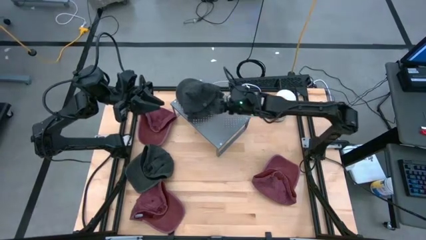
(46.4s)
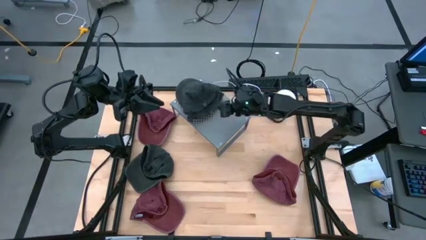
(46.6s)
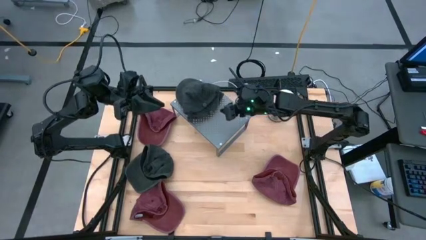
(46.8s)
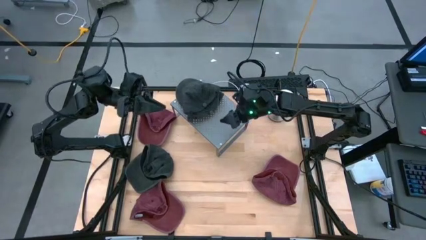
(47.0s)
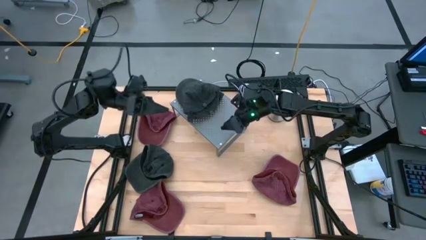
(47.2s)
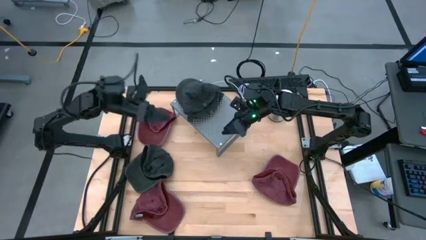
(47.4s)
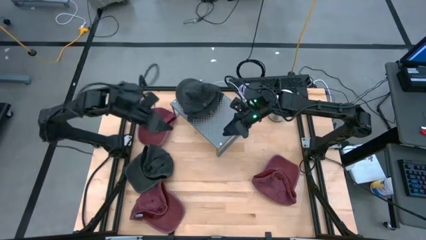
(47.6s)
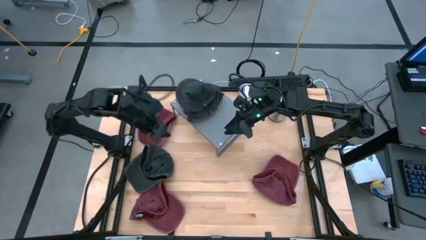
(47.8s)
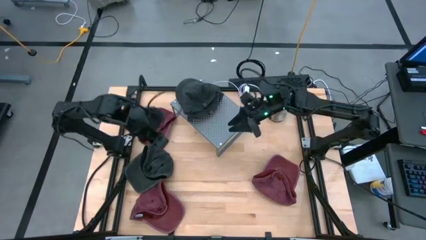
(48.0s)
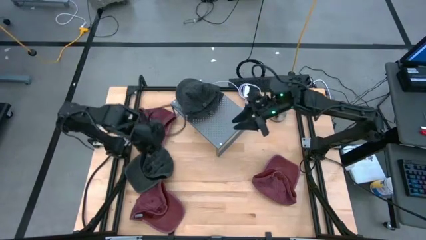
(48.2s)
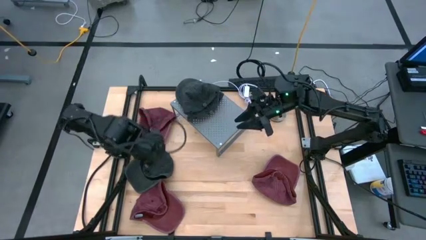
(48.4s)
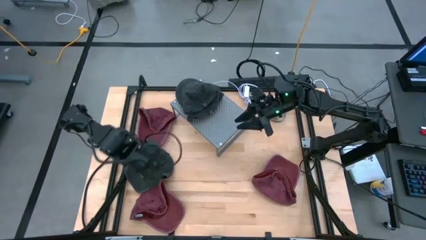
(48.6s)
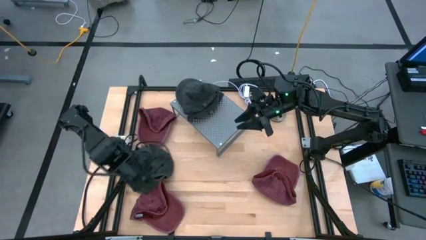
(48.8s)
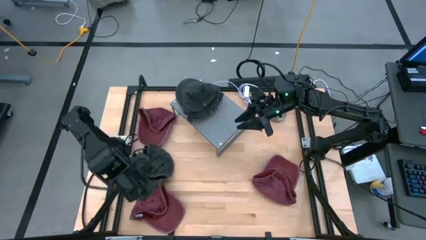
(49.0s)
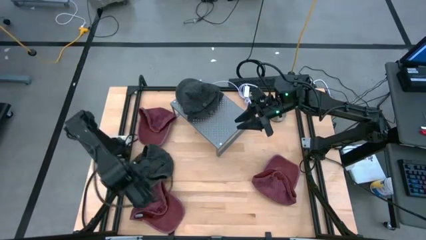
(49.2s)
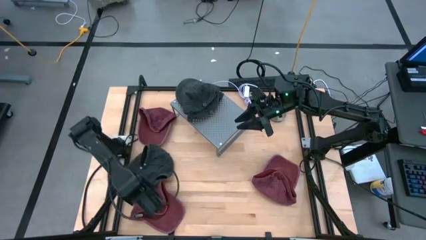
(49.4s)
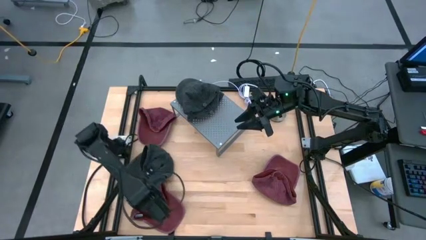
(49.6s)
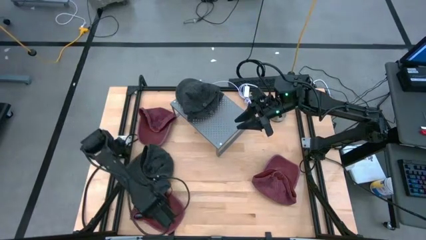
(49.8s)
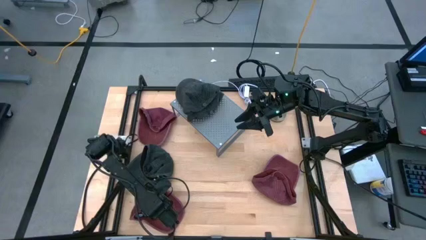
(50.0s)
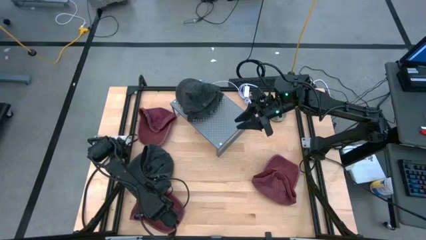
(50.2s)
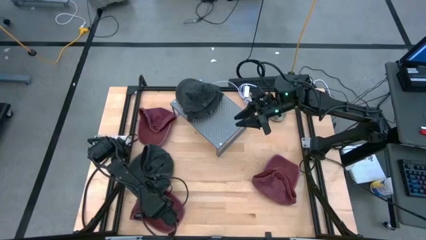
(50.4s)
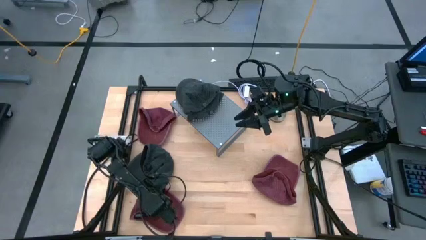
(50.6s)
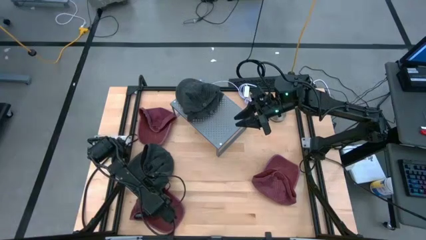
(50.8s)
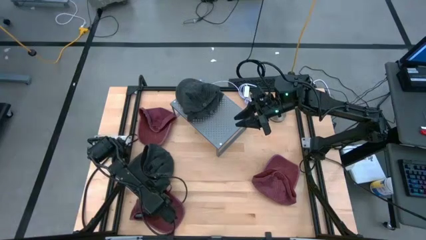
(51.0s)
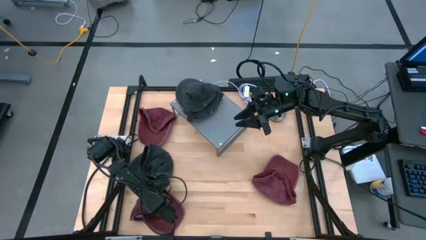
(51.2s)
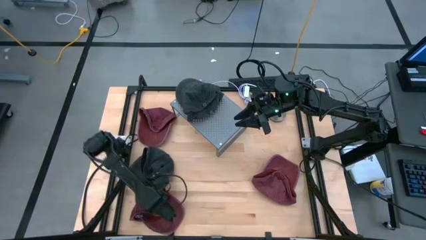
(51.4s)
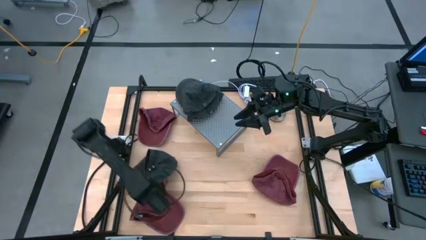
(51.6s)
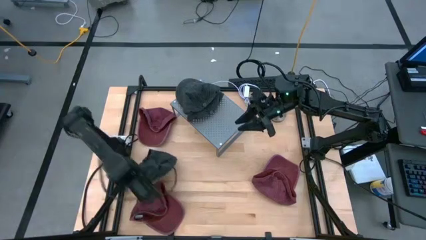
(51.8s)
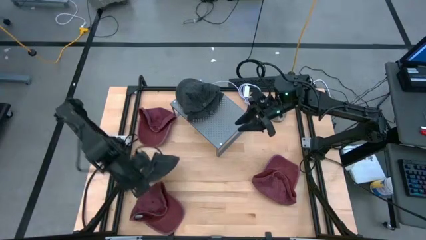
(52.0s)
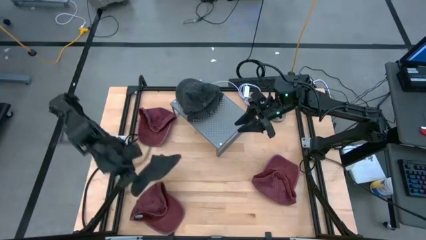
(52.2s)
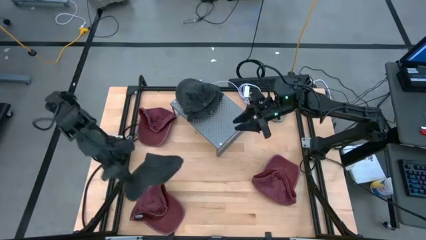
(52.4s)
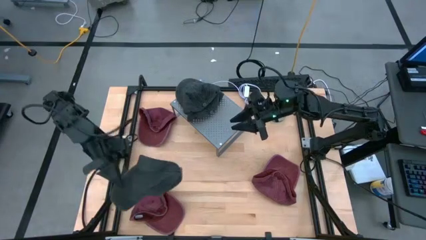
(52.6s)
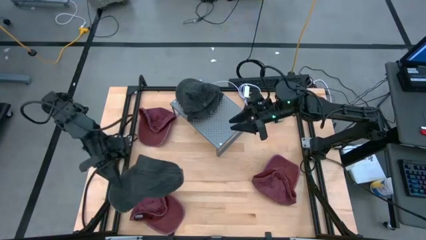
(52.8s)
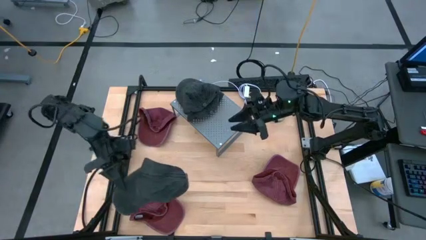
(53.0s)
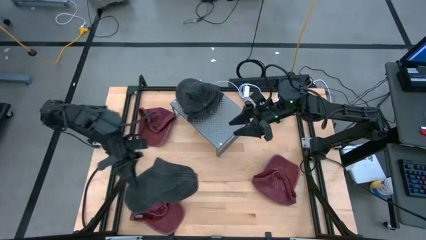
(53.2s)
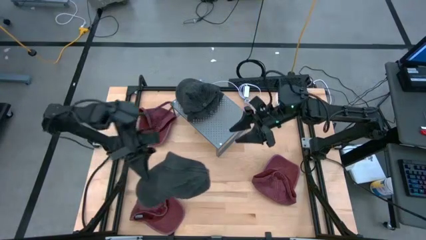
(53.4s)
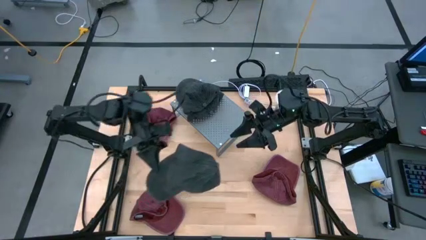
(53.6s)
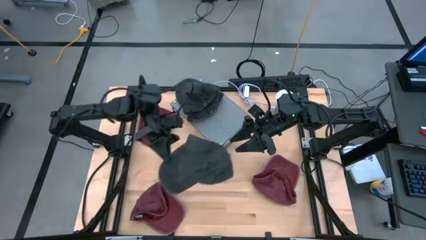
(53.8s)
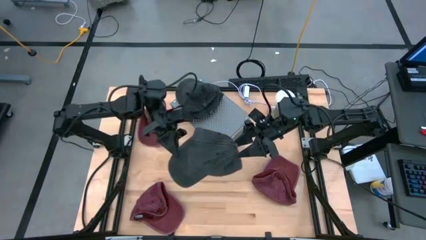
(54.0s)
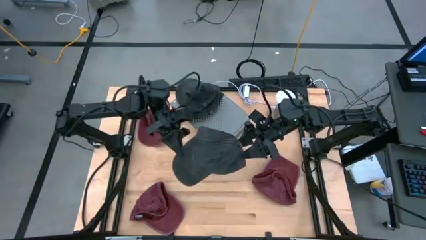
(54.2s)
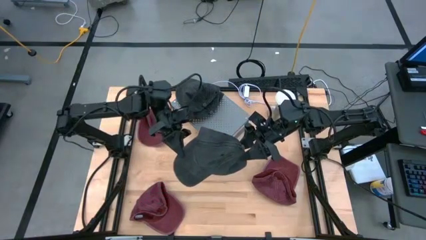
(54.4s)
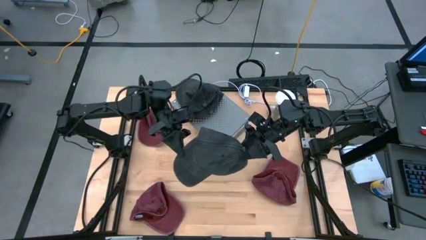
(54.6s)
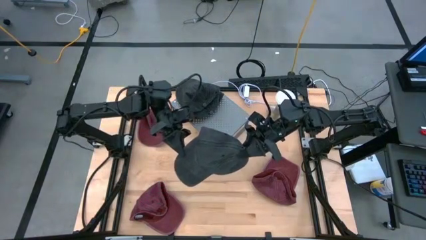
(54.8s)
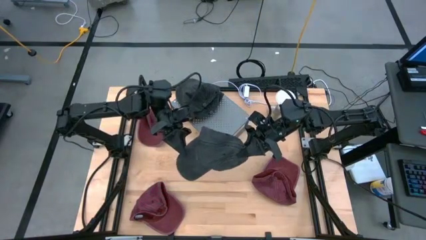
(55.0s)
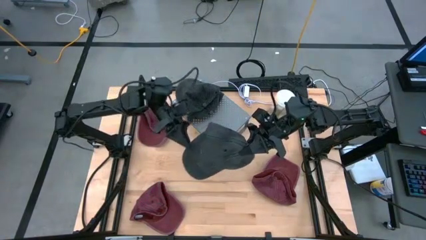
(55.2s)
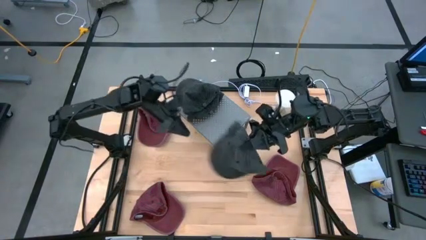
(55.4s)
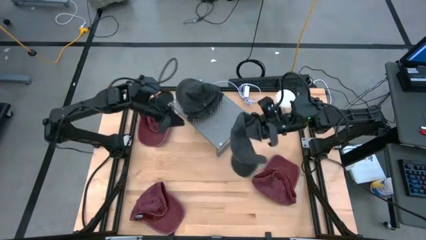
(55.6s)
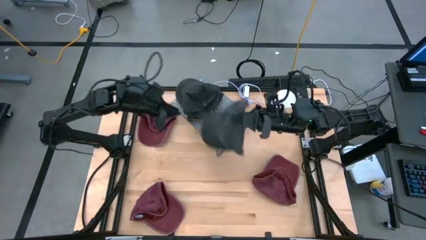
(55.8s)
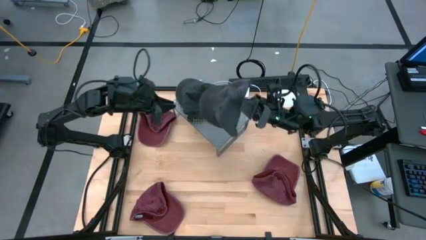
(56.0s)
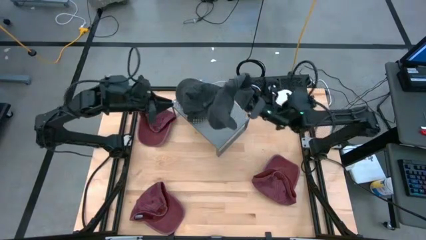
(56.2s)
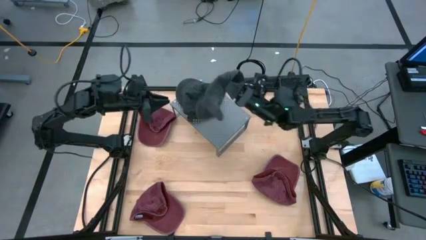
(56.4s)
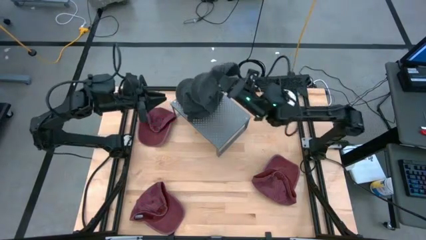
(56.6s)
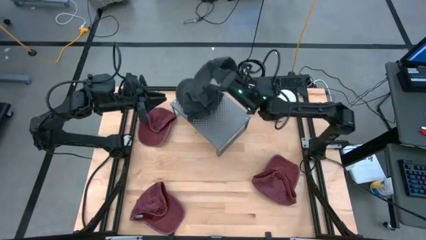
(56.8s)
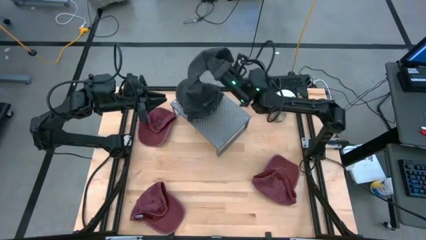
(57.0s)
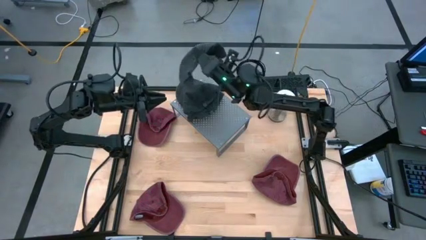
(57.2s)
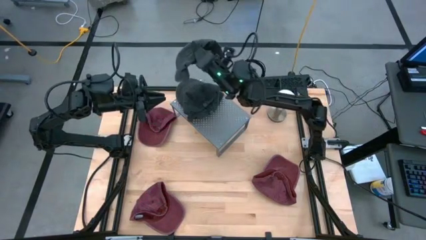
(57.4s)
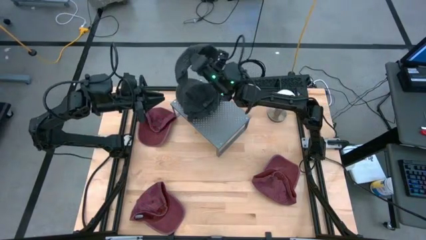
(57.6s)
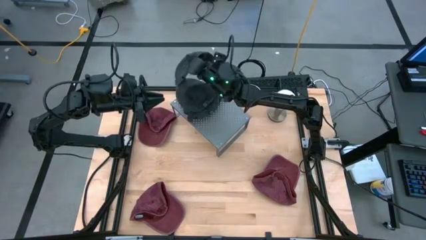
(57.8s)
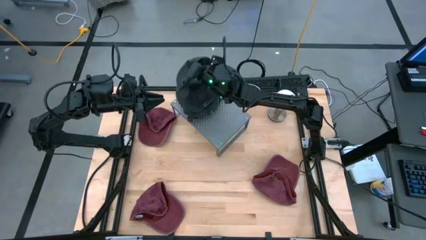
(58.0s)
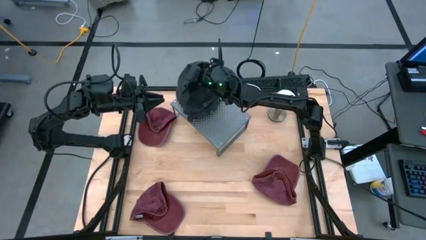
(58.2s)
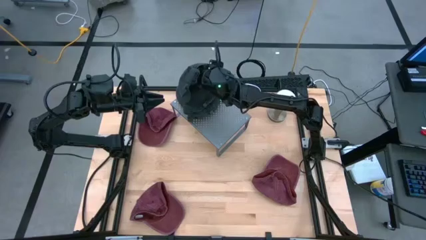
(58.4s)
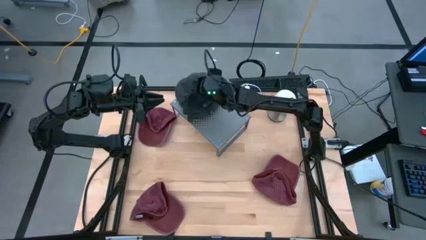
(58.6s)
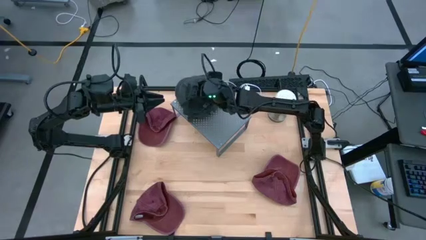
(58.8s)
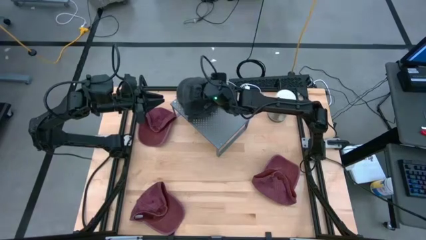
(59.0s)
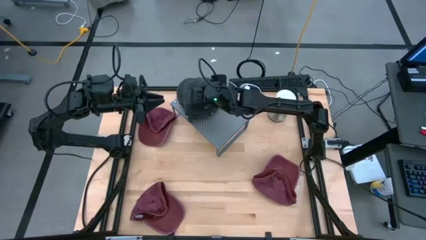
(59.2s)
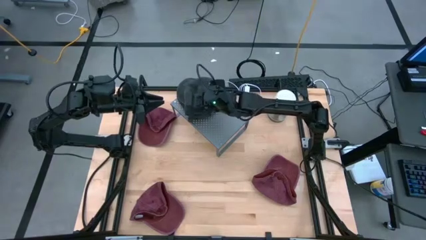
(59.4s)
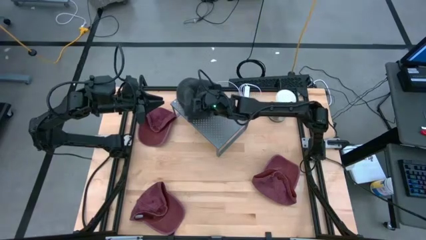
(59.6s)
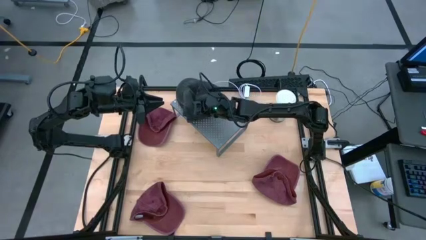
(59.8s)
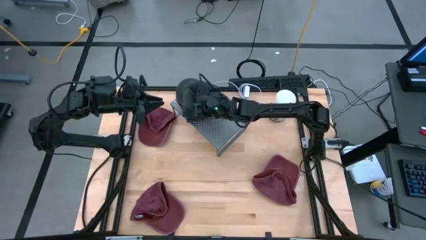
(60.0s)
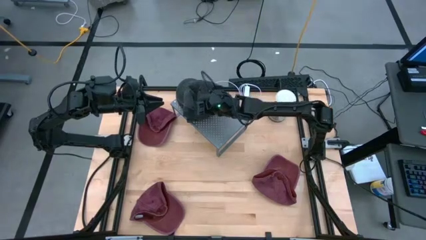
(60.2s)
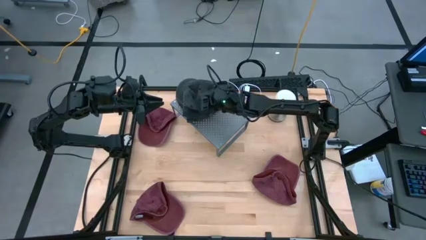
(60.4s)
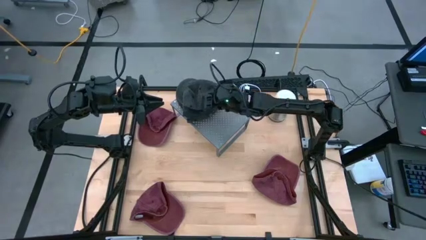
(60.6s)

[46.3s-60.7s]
Task: Pick & Place hat
Stack the black cap on the black cap on the shelf

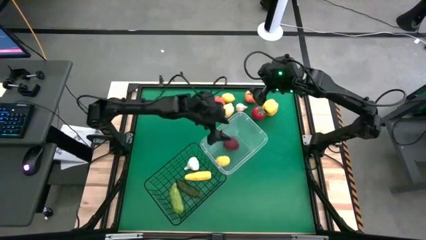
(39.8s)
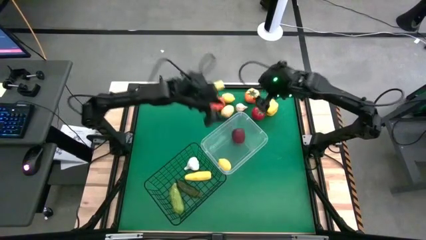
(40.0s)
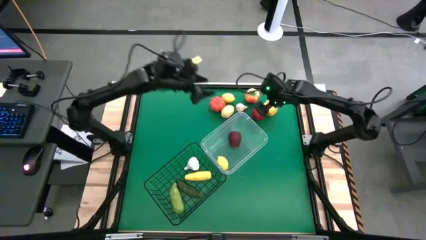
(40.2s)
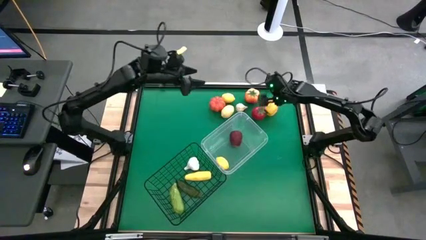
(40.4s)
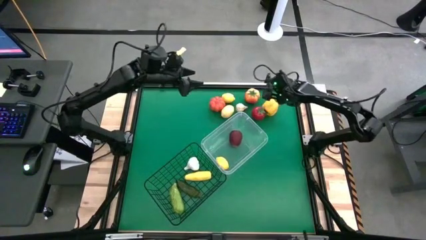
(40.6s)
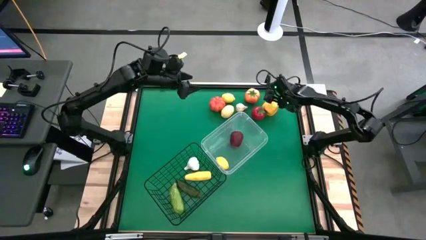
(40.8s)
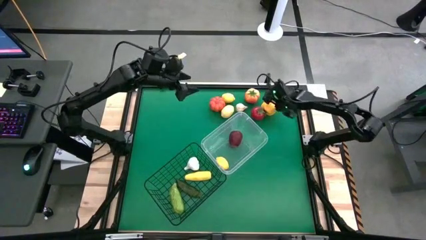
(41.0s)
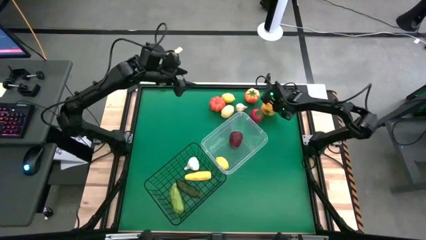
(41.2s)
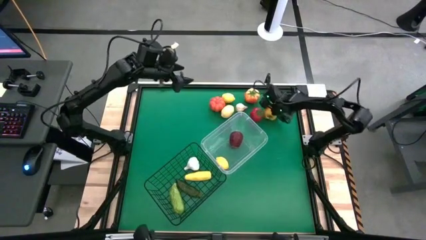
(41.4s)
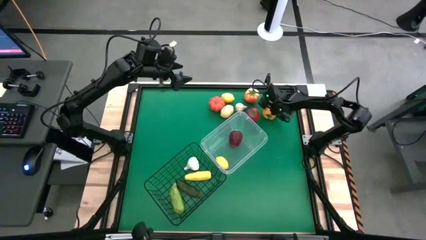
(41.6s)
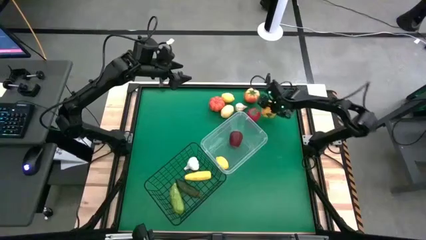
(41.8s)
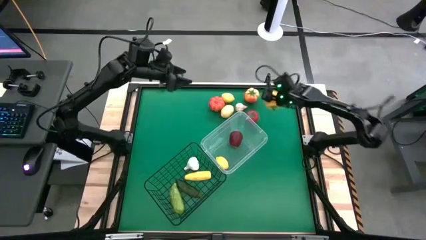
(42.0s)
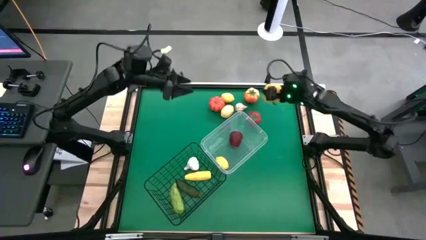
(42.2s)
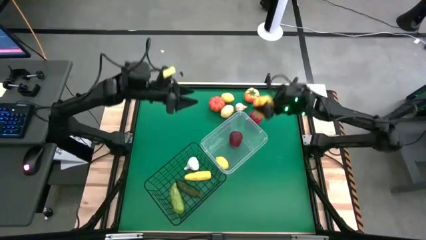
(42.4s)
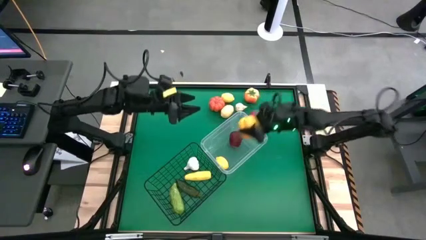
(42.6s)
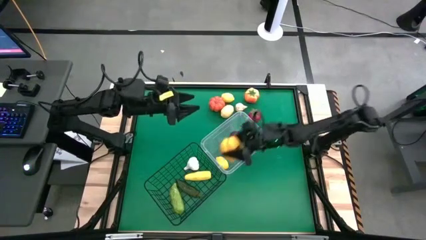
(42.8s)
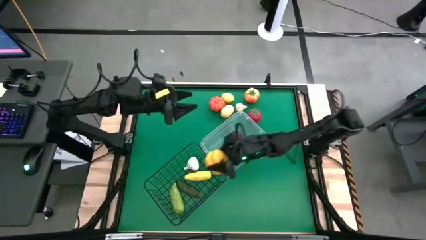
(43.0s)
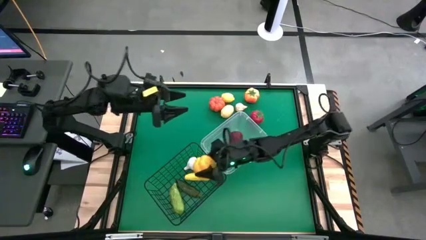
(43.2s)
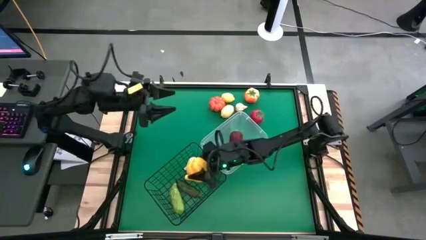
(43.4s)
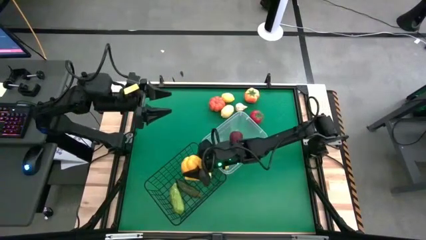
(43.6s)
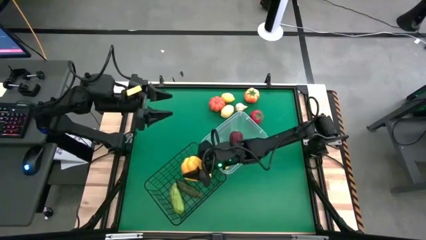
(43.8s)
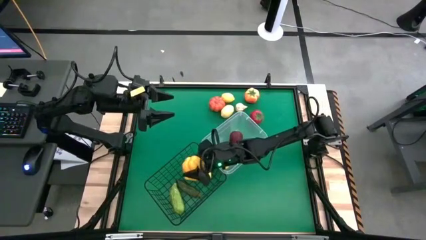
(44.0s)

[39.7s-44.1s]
Task: Sort produce into baskets
Put the yellow bell pepper into the wire basket
